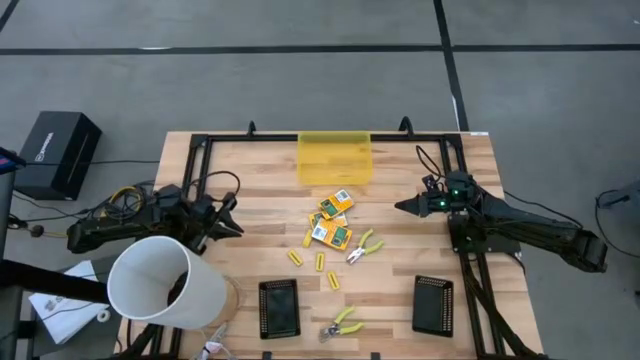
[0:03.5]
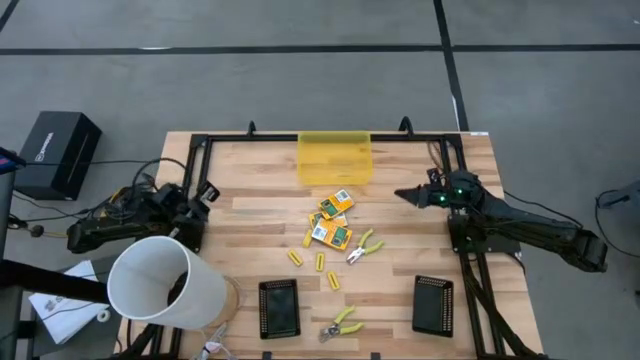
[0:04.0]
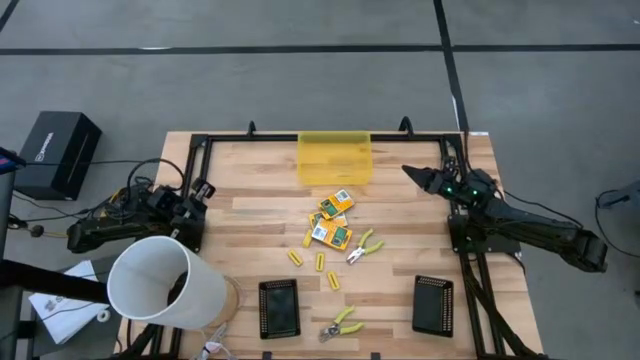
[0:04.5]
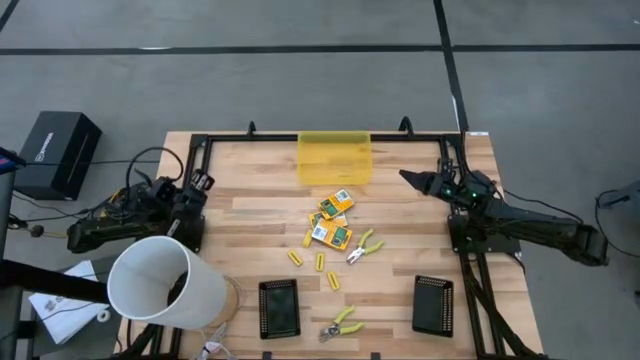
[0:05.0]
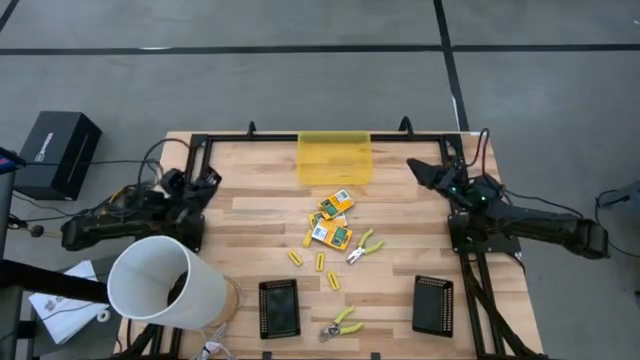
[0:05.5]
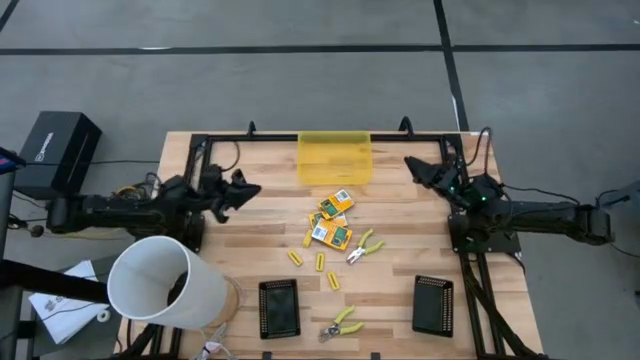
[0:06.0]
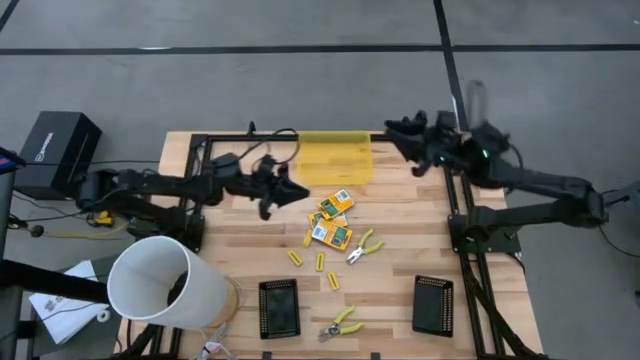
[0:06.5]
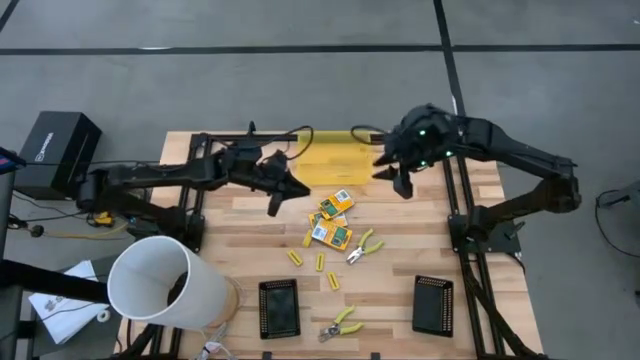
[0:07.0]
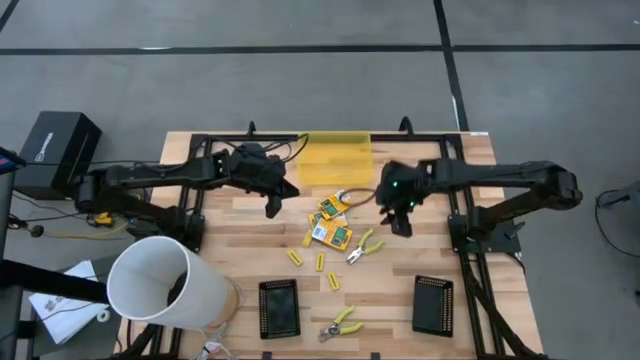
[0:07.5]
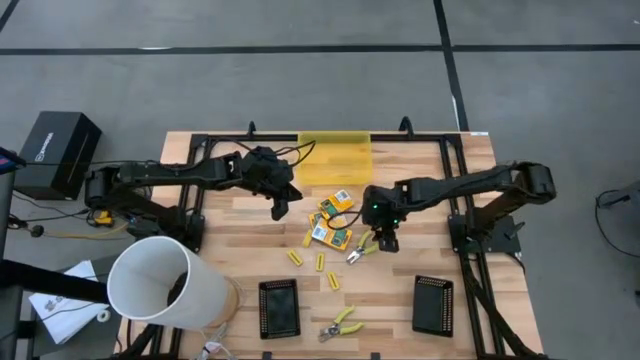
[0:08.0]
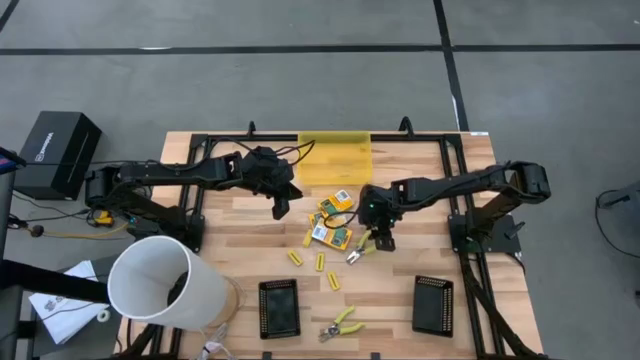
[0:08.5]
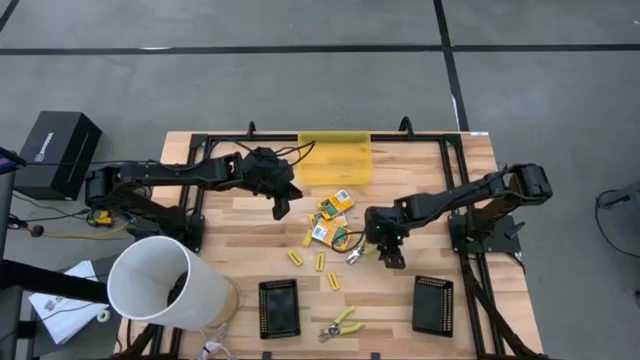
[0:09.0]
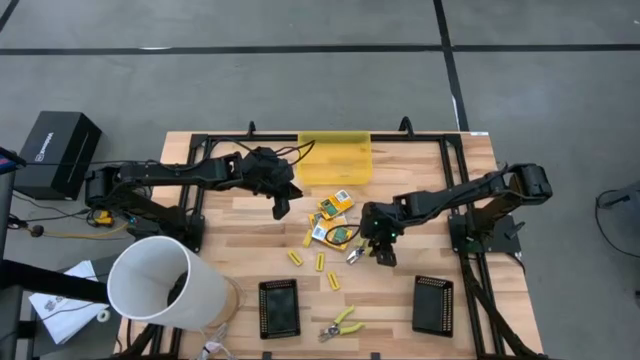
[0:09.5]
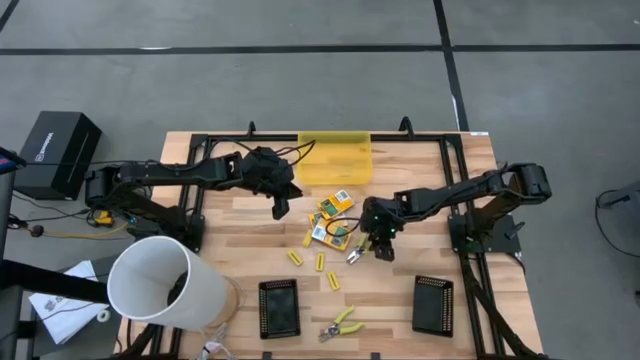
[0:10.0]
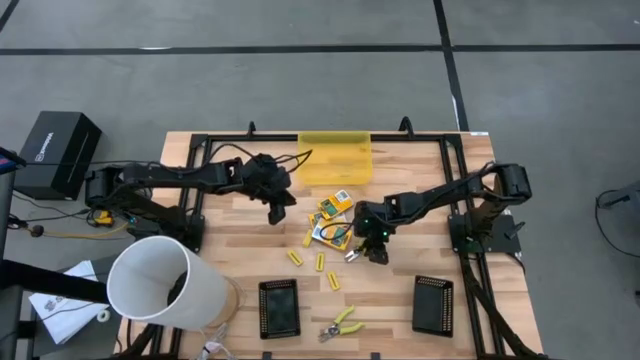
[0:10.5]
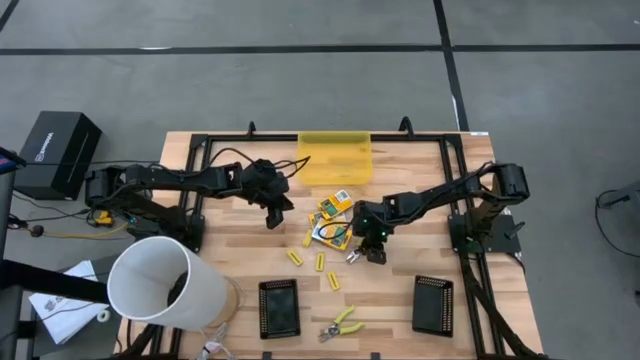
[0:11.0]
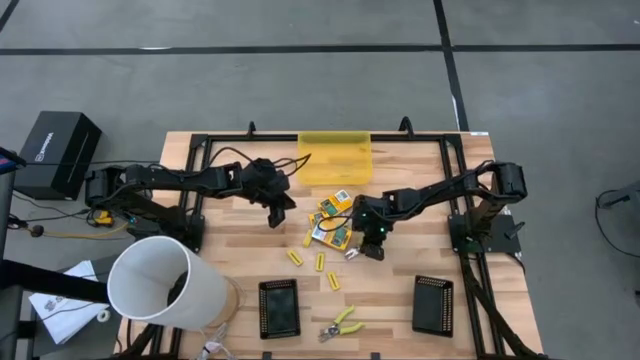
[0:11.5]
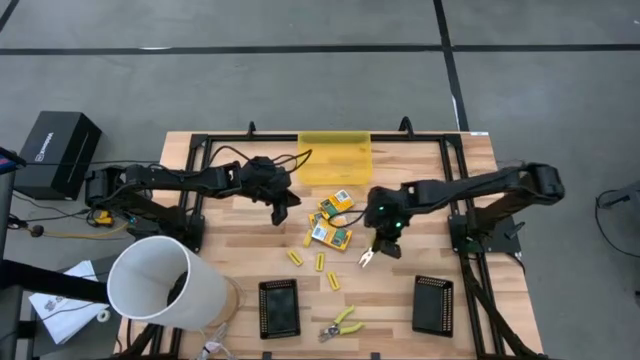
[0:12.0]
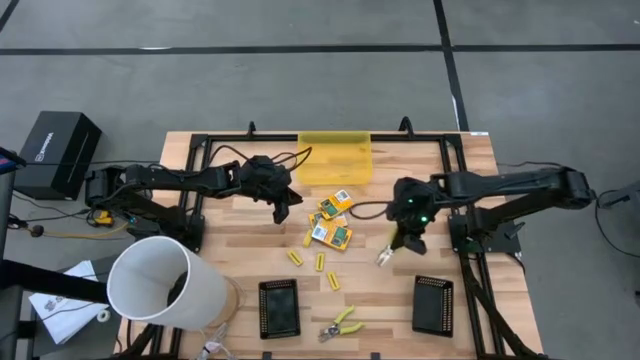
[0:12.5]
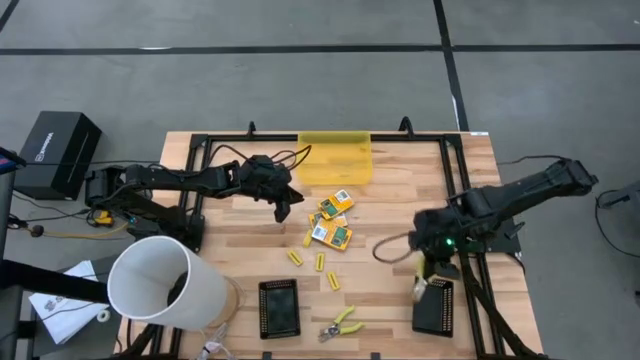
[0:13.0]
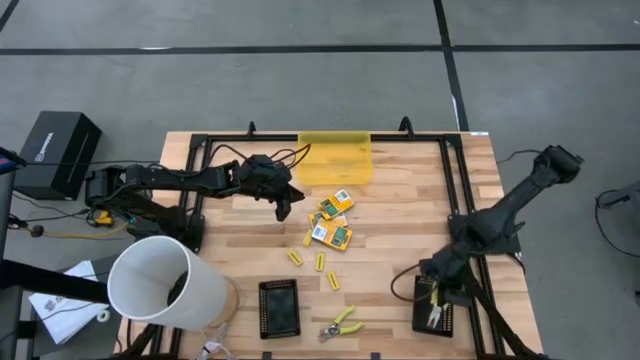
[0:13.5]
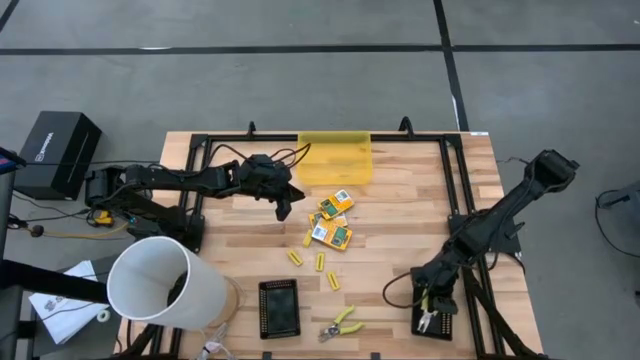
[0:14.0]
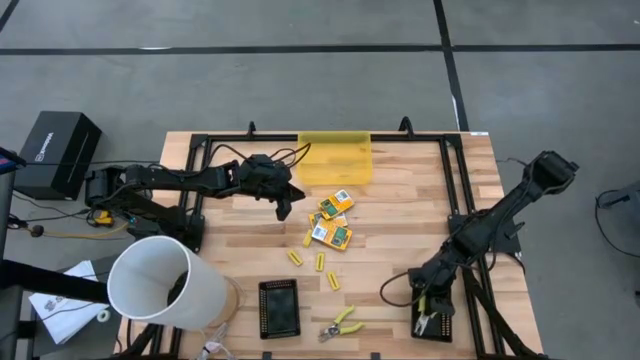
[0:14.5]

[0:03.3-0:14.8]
Task: Pick & Place School Supplies
Put the green hole puncher into the right black bin

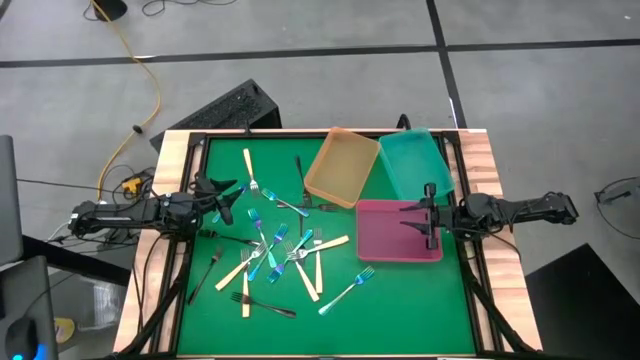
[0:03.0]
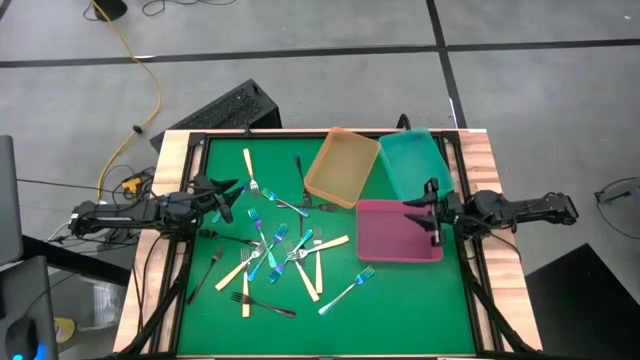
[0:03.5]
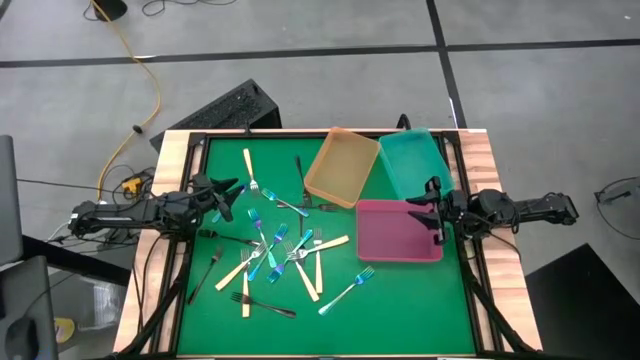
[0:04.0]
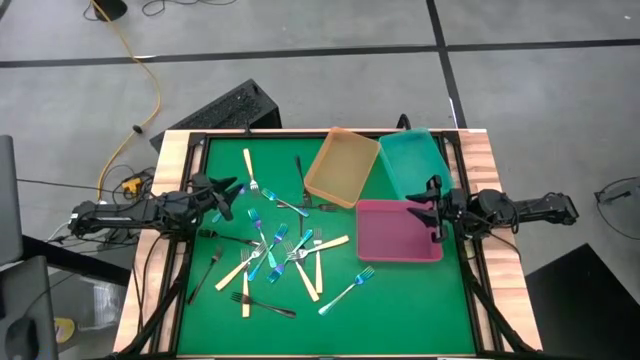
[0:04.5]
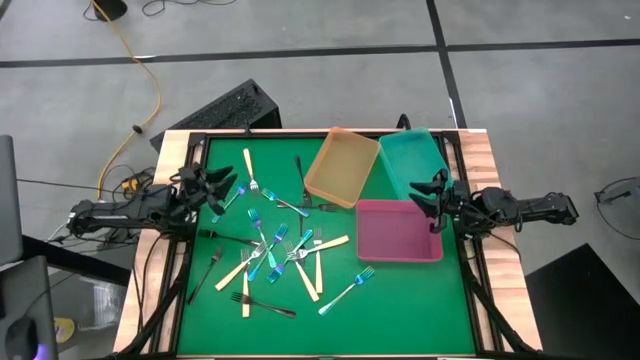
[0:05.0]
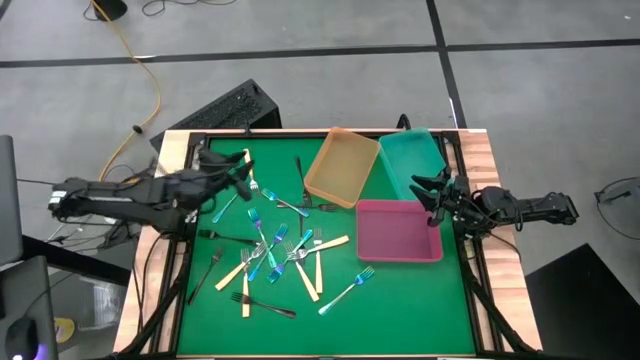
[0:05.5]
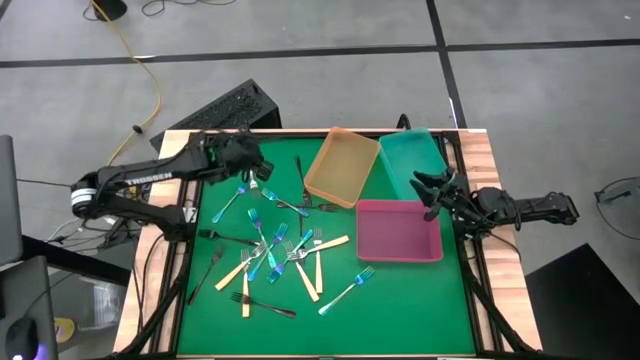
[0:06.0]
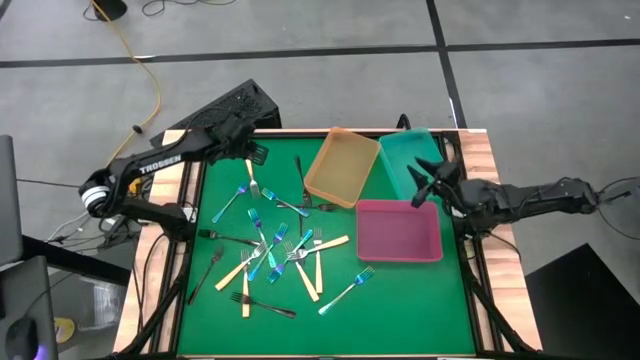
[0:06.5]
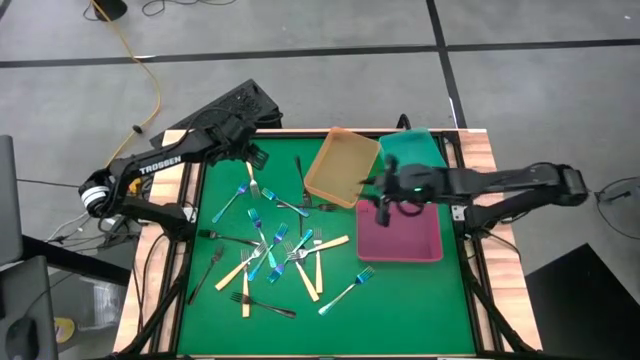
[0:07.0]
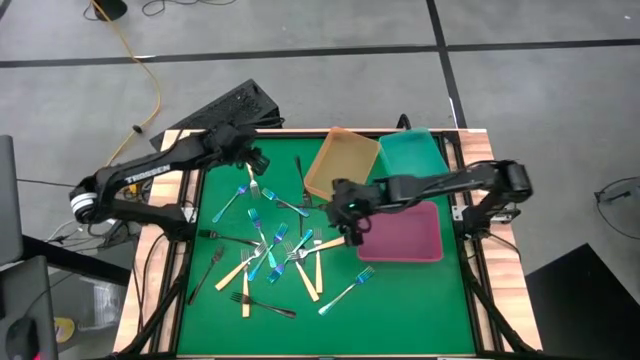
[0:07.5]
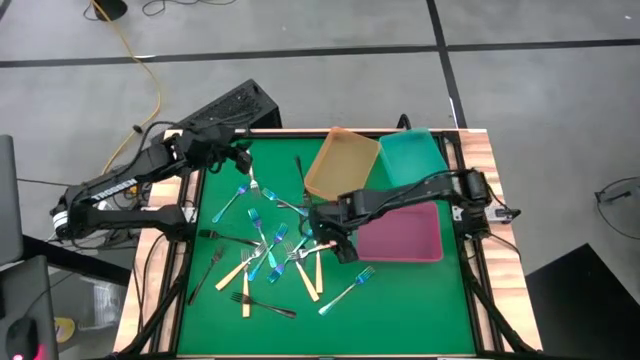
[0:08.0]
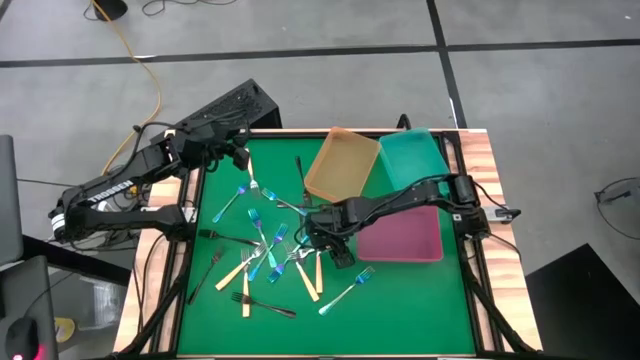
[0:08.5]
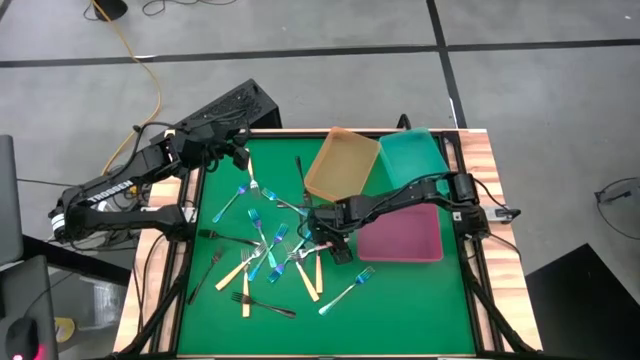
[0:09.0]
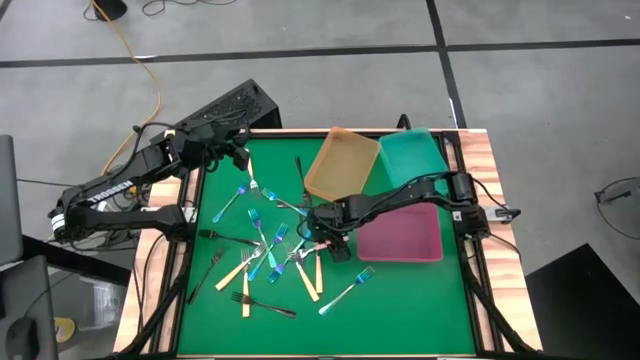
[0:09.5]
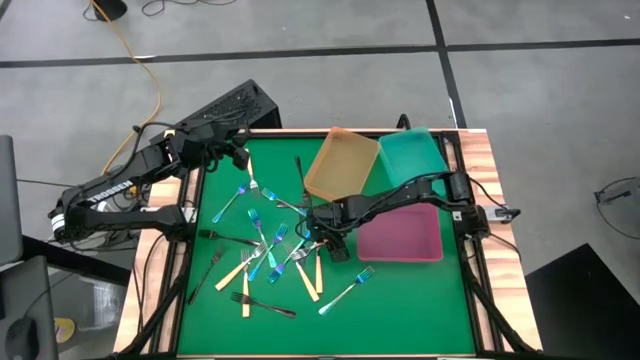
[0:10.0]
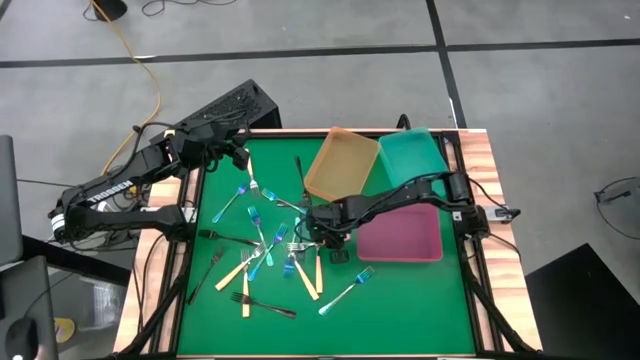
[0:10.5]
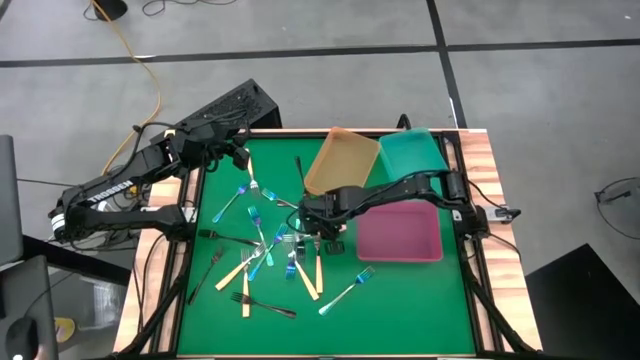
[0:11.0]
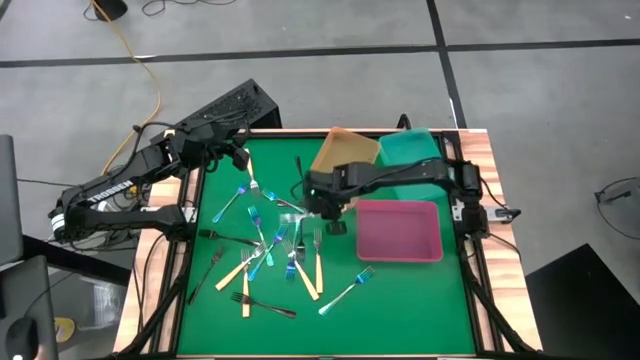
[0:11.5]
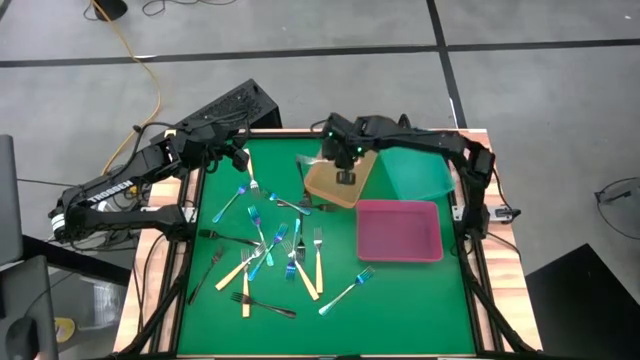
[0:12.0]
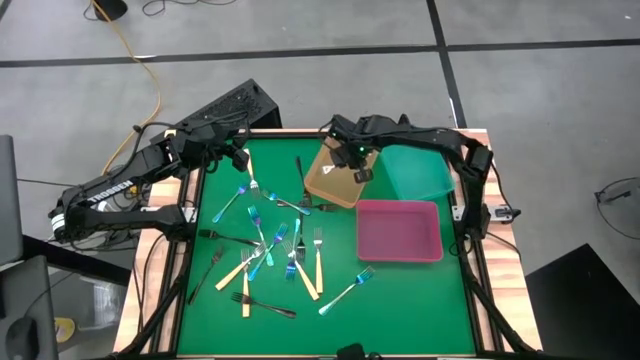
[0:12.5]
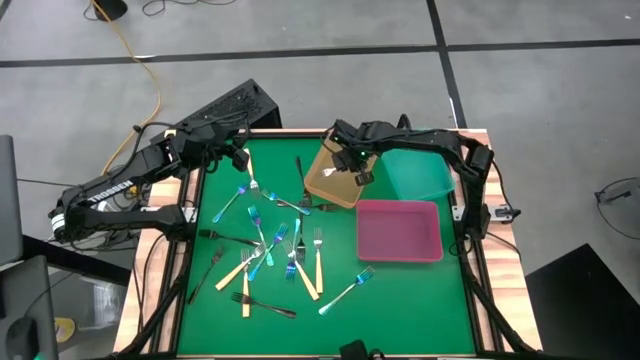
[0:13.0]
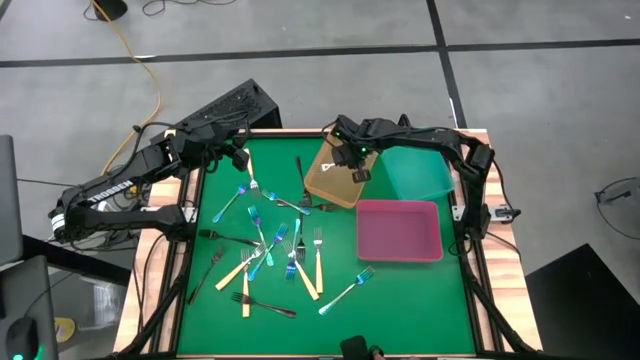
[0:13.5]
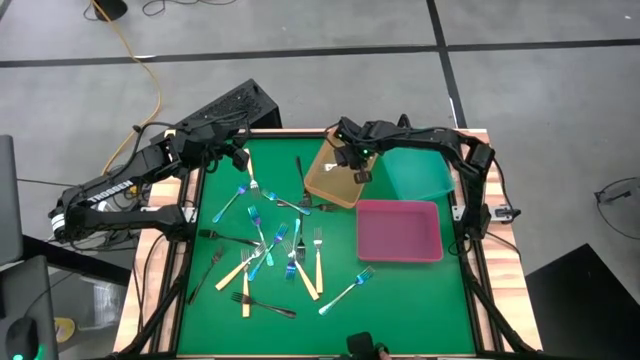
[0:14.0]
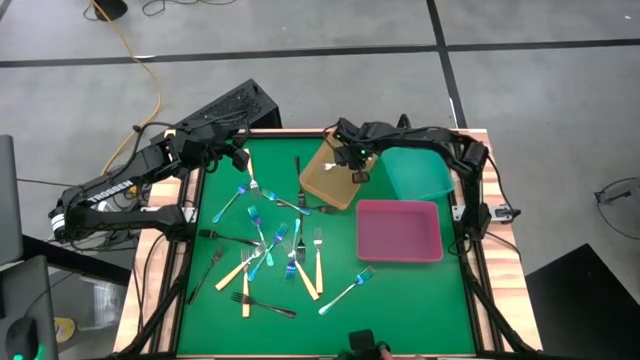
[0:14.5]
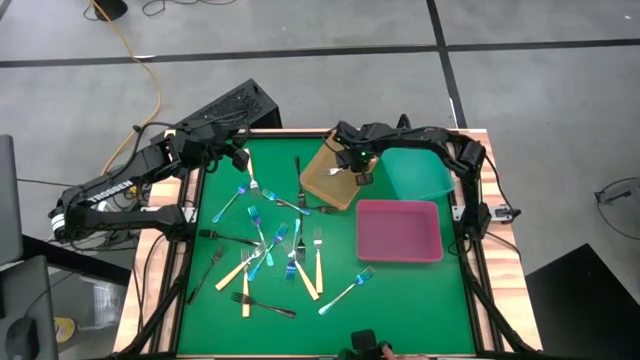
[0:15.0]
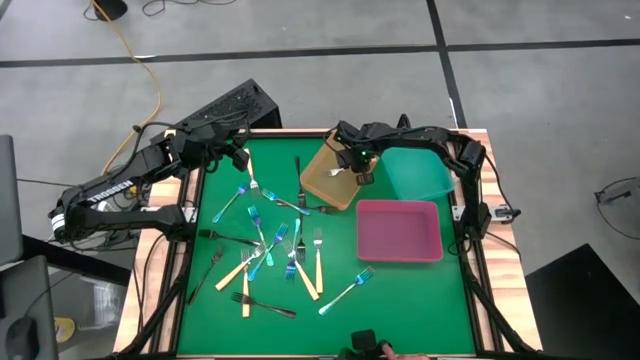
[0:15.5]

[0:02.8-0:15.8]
Task: Sort silverware by color (type)
Put the orange fork into the orange bin
